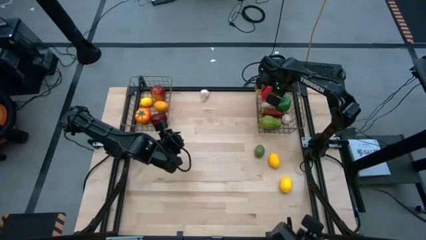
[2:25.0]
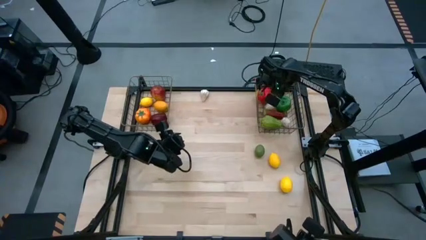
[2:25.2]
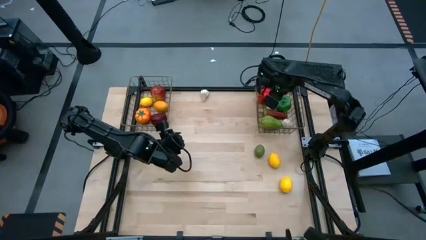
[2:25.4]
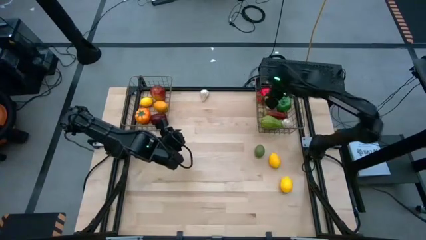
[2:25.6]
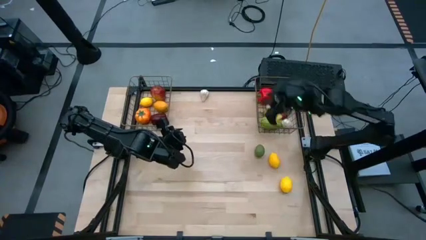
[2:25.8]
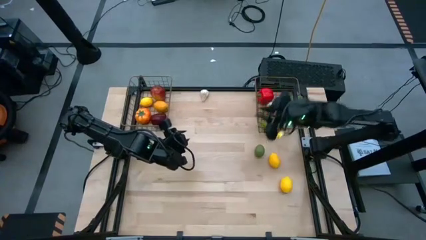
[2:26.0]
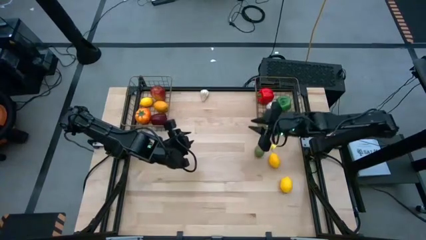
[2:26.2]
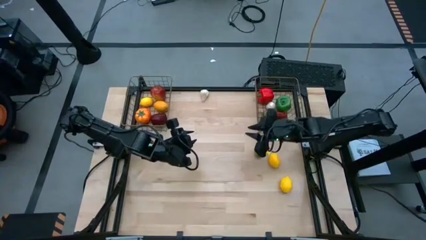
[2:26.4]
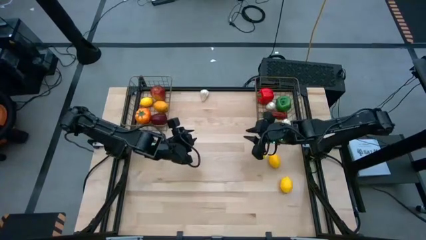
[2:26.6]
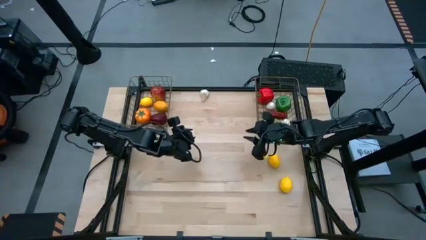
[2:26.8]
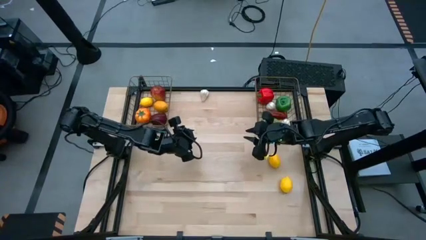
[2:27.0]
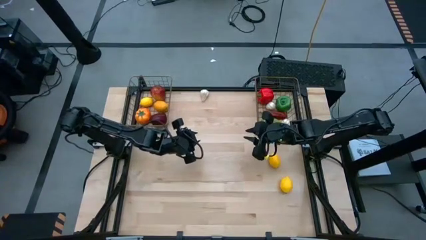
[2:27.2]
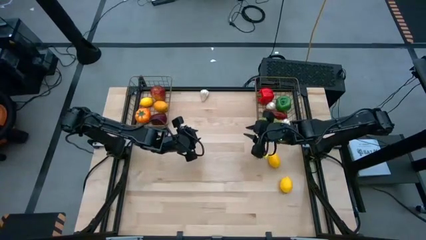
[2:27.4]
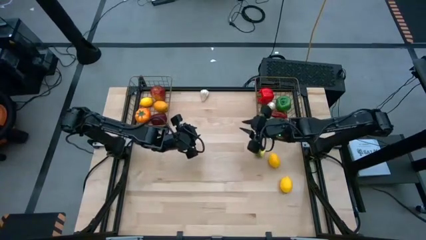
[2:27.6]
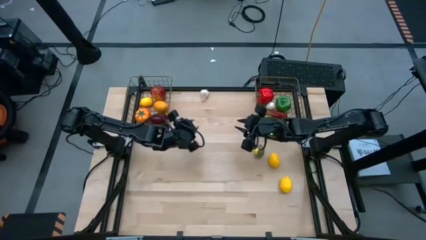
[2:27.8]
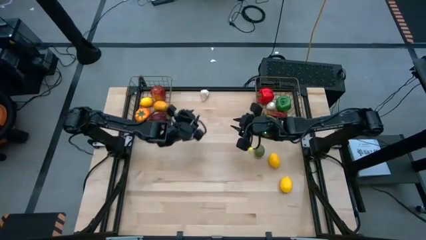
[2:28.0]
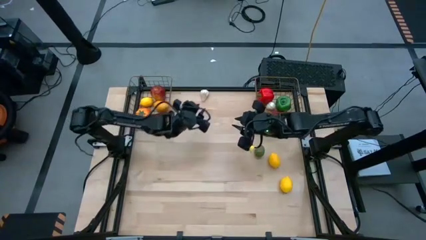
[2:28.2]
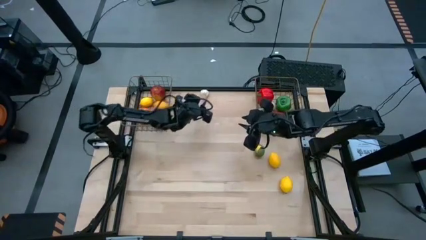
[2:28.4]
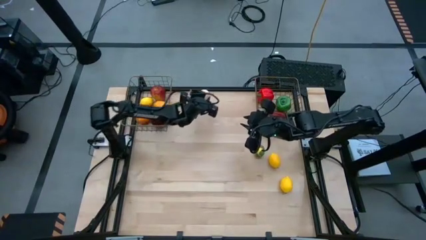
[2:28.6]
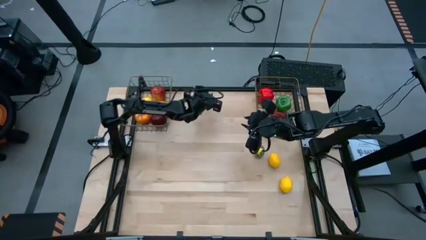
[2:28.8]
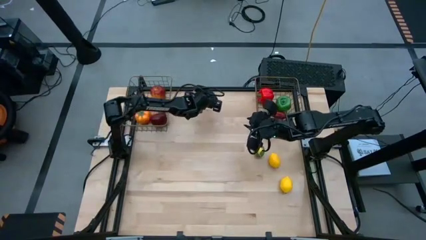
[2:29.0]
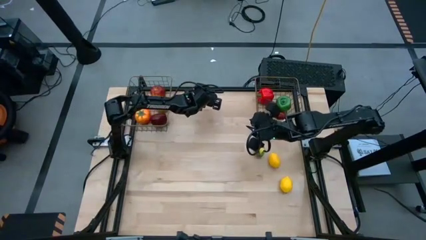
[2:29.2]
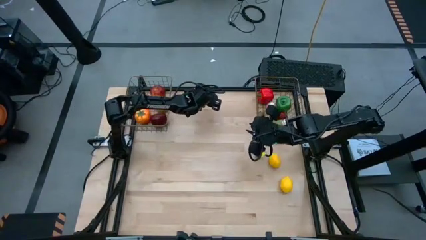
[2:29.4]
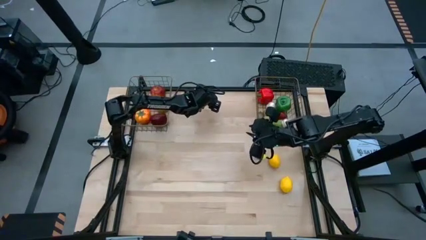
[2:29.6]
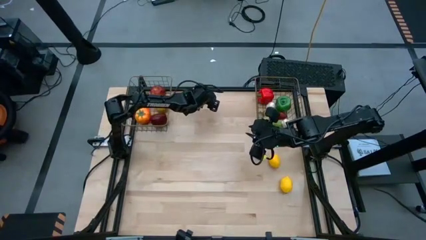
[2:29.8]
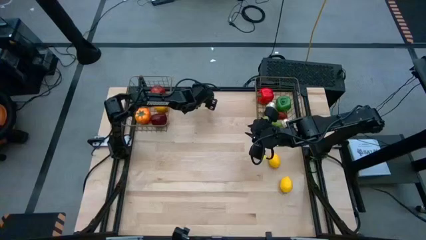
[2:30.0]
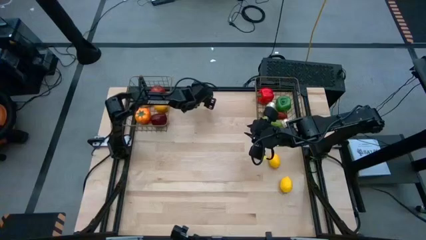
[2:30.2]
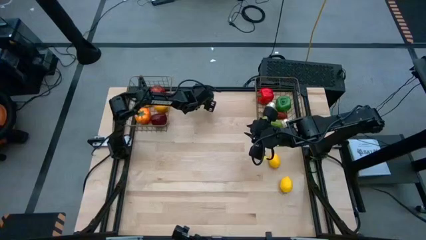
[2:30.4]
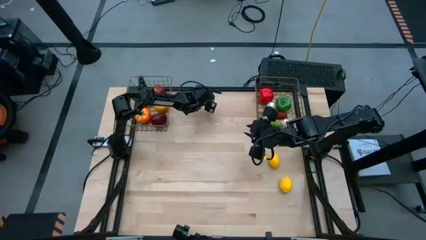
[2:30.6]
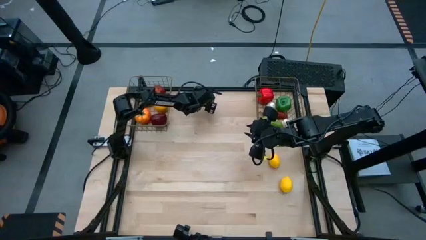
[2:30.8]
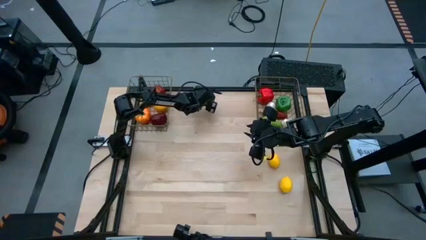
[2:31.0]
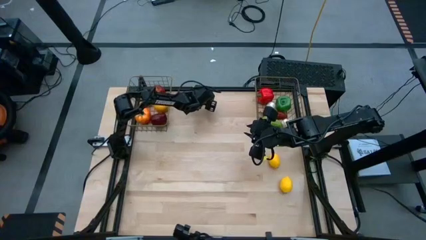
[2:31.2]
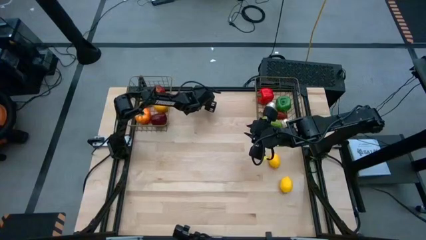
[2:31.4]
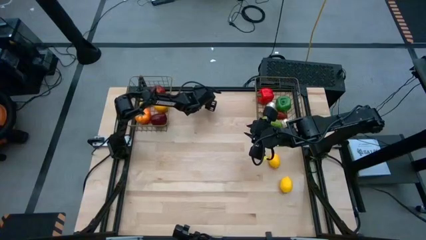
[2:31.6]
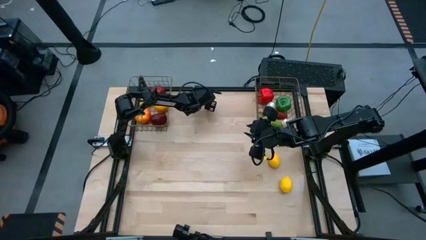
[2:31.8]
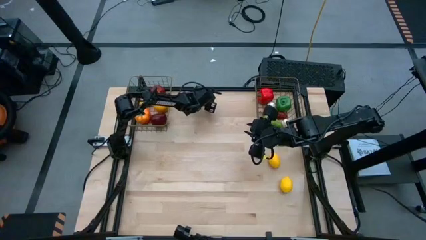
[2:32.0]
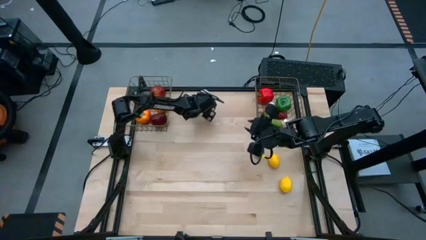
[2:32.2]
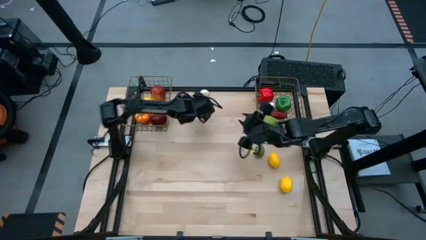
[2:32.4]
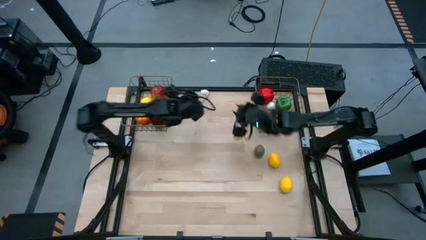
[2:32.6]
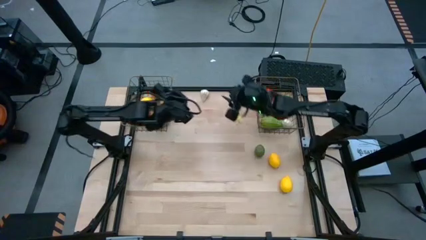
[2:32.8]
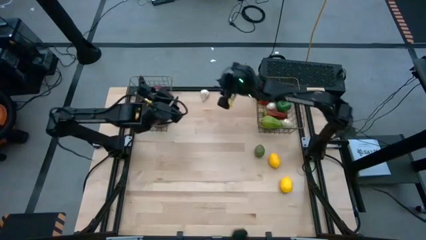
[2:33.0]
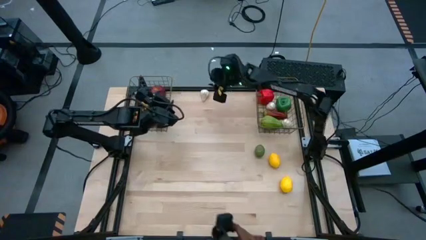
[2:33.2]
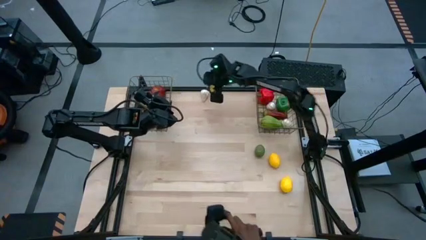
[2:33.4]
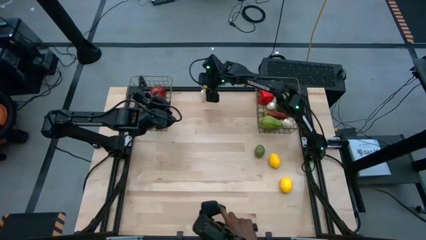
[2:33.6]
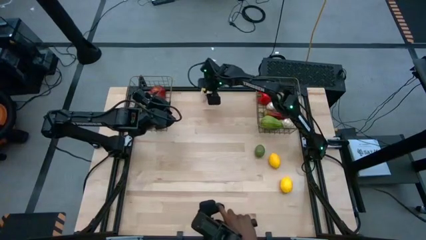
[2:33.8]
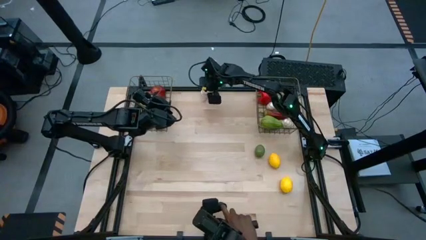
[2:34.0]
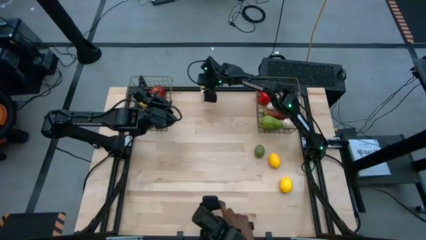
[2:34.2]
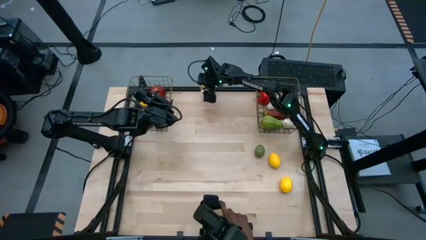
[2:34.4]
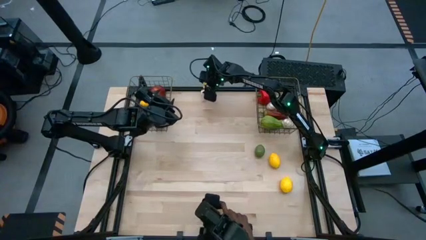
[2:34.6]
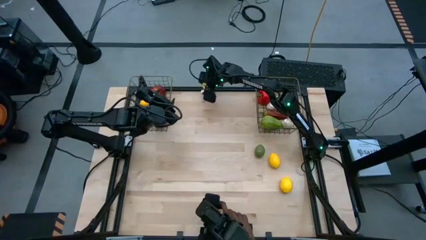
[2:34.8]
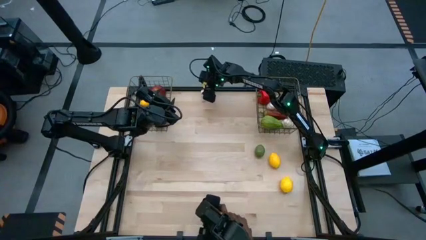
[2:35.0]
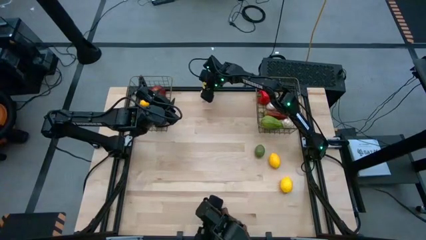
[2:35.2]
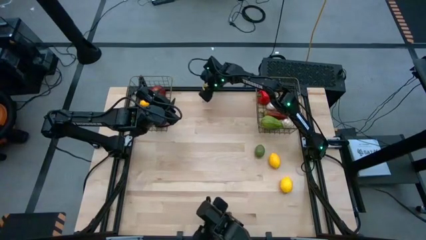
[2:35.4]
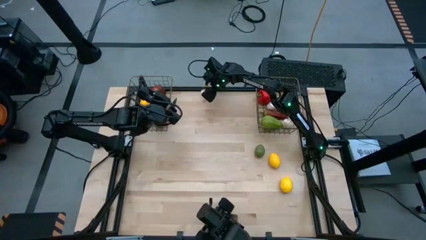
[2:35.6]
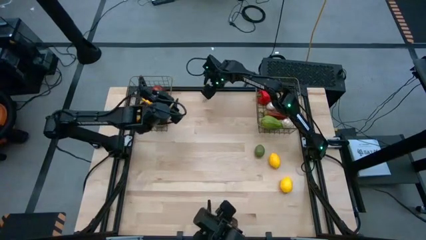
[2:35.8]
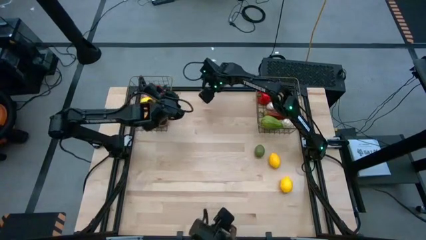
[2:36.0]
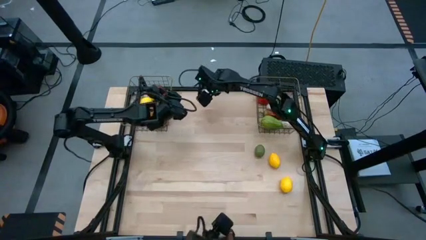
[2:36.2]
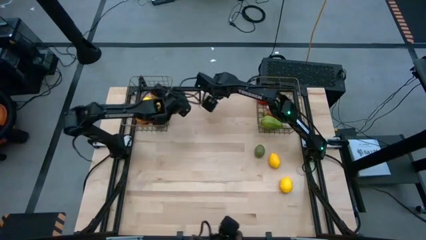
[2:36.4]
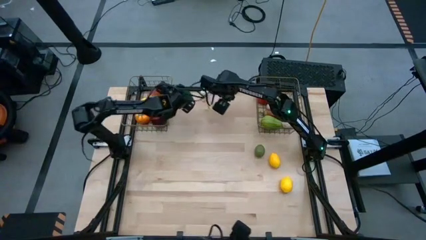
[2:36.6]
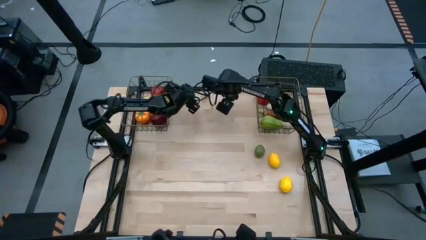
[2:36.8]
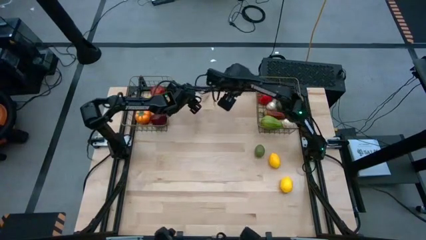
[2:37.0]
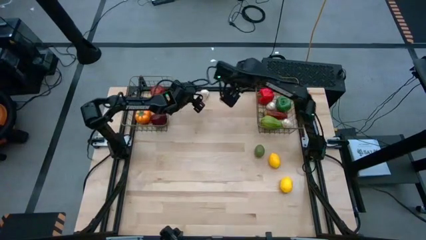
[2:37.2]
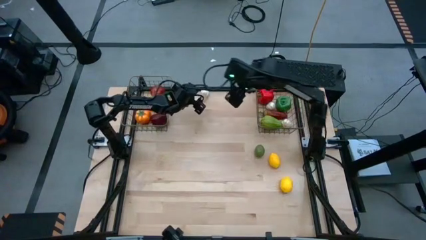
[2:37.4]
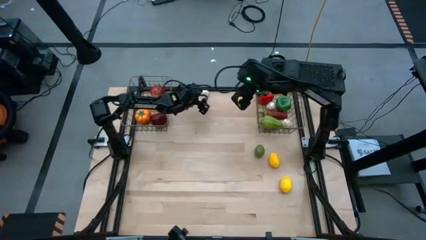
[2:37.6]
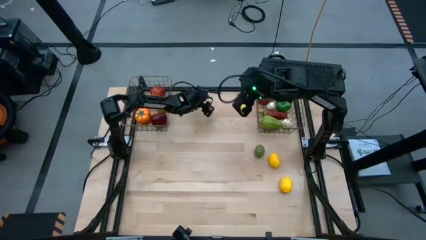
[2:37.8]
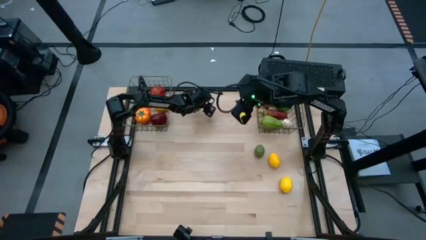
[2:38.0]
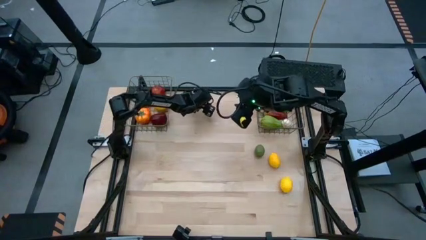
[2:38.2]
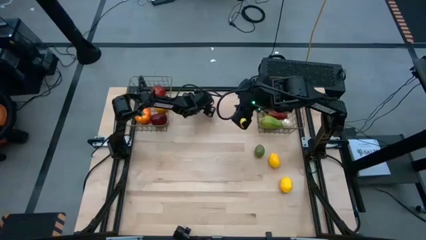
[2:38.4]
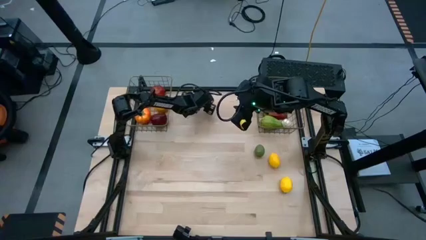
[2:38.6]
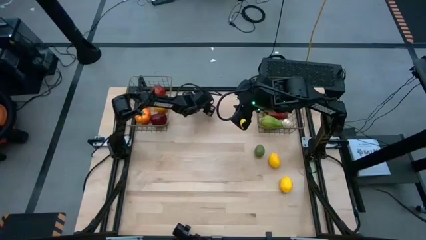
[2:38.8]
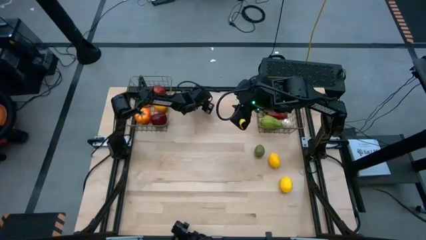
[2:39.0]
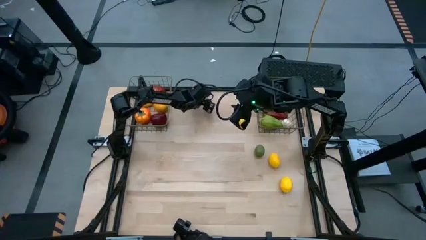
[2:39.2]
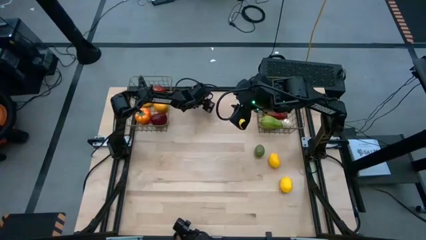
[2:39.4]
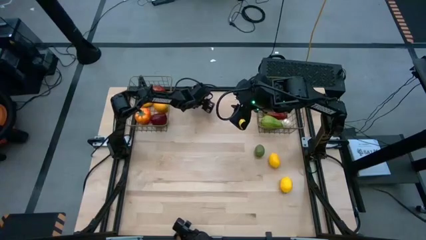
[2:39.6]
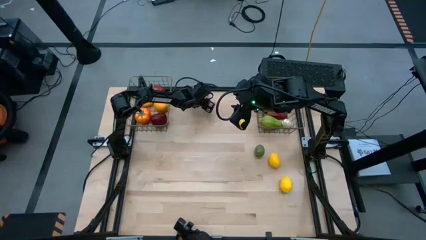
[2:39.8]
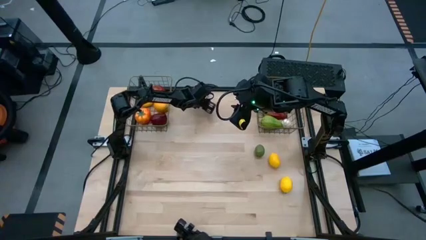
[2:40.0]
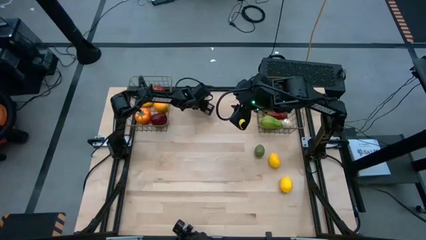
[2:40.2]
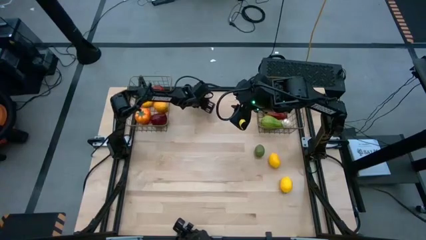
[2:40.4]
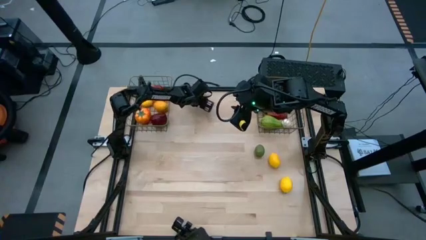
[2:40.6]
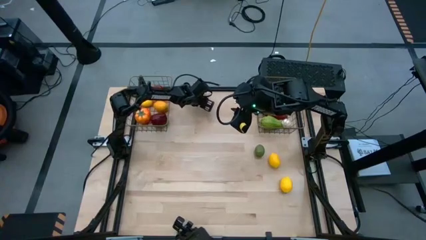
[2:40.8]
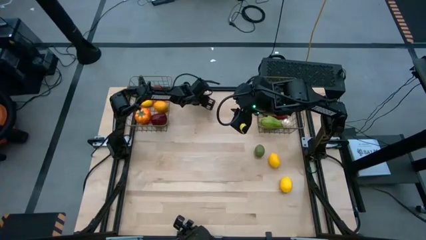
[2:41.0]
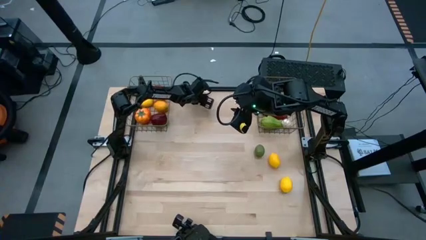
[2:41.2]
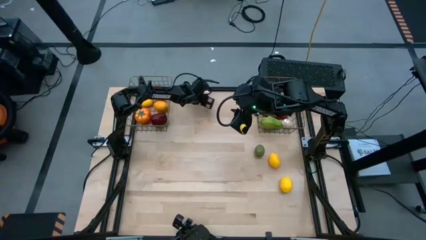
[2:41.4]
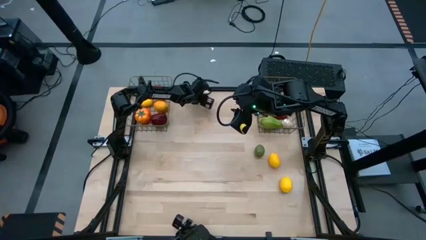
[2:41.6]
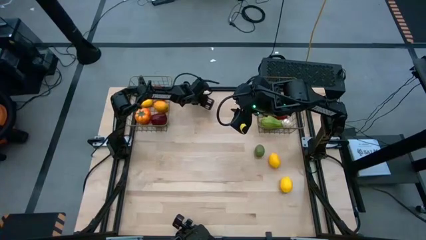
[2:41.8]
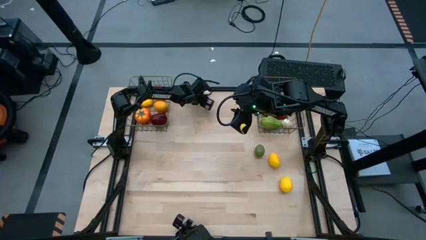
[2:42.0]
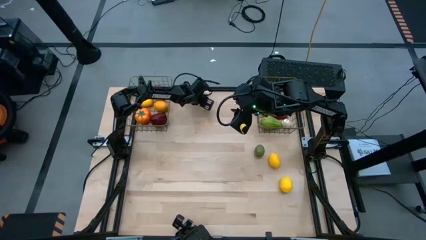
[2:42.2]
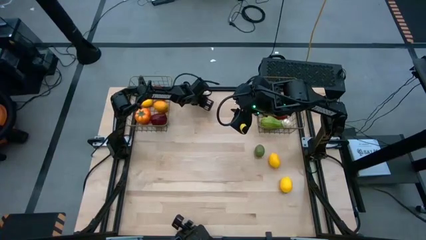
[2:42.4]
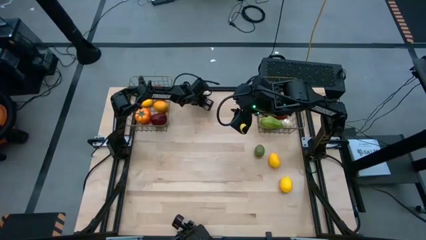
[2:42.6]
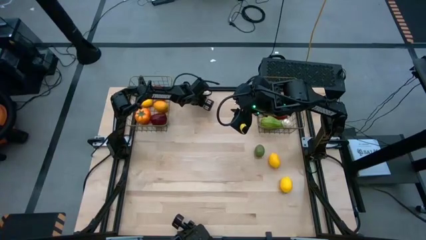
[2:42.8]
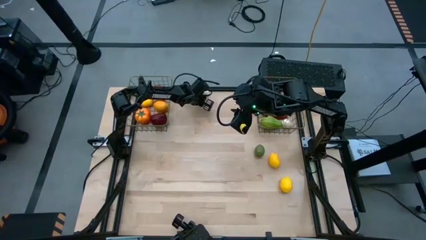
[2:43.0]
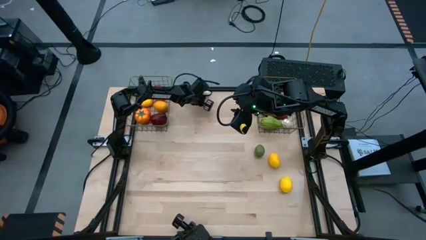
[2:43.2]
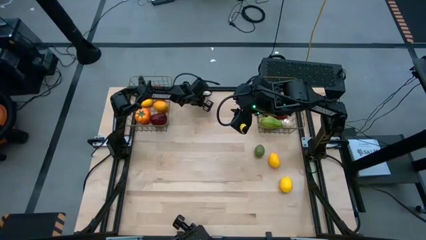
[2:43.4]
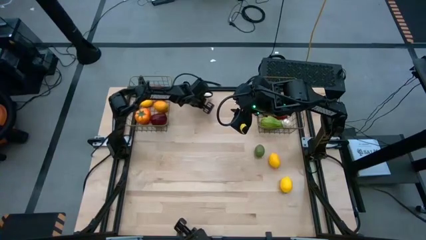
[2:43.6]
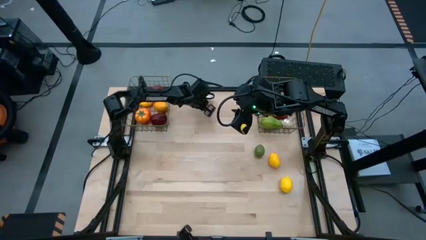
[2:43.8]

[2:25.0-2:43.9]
Task: Sort produce into baskets
Put the garlic into the right wire basket
